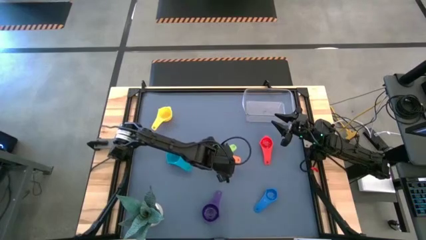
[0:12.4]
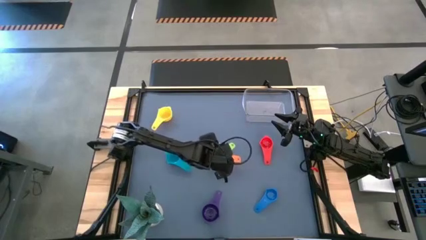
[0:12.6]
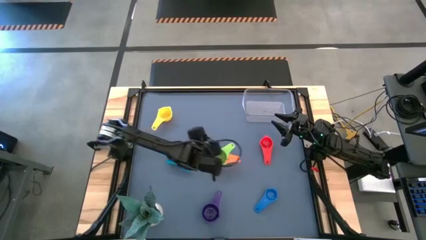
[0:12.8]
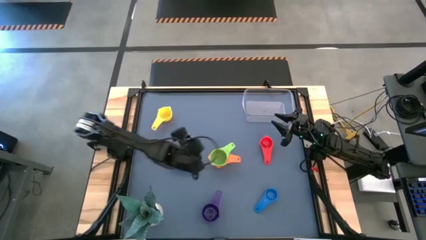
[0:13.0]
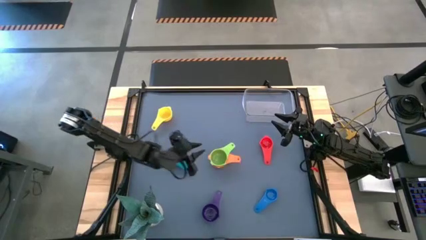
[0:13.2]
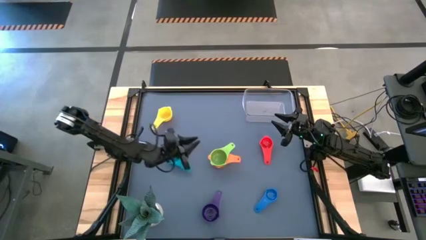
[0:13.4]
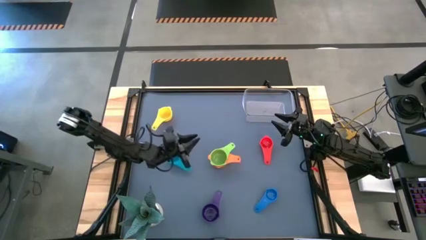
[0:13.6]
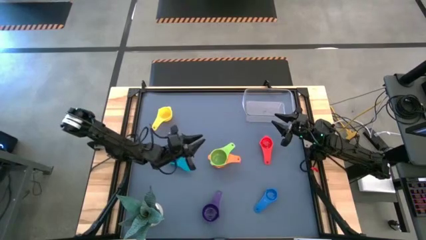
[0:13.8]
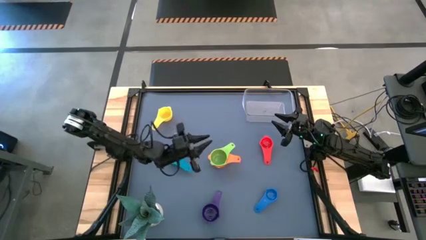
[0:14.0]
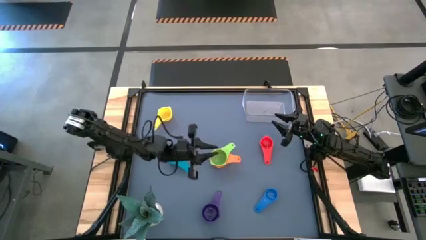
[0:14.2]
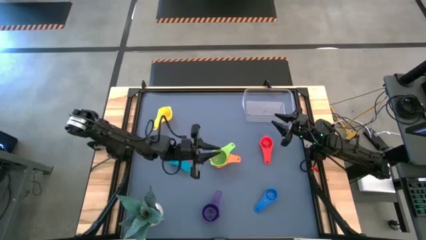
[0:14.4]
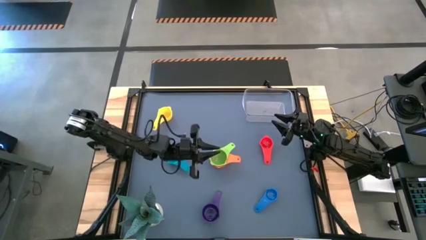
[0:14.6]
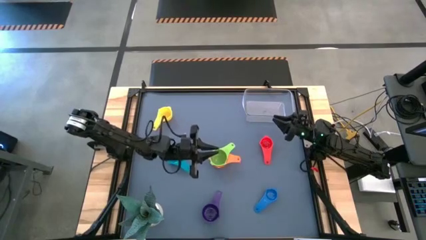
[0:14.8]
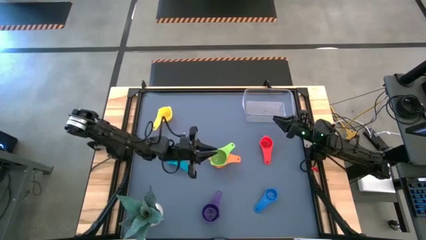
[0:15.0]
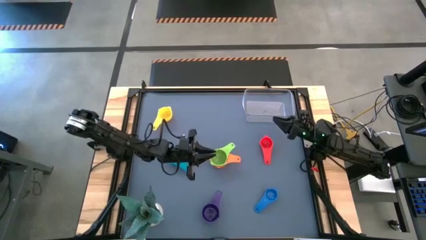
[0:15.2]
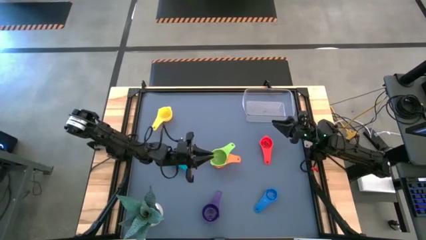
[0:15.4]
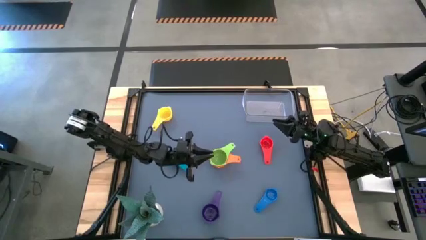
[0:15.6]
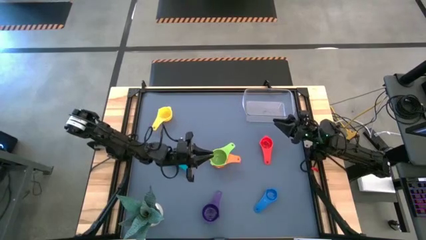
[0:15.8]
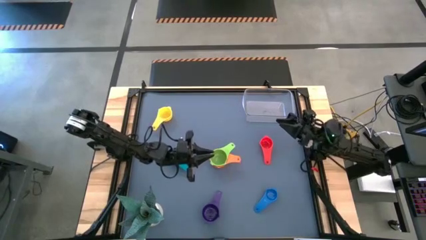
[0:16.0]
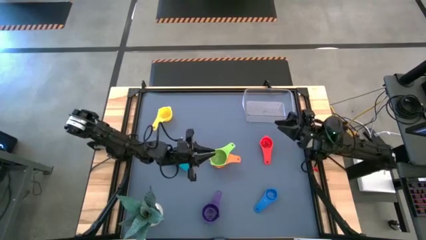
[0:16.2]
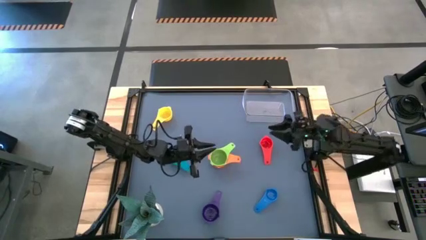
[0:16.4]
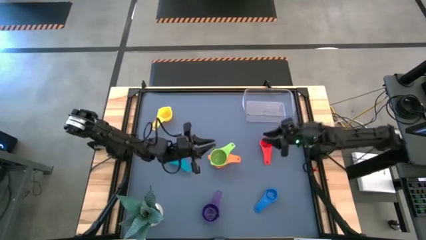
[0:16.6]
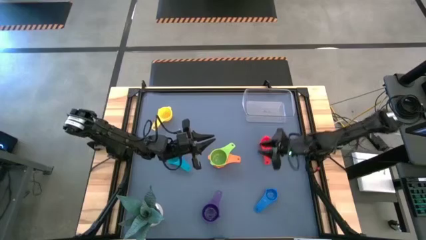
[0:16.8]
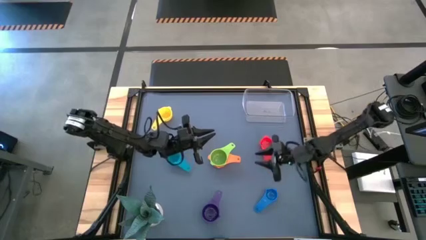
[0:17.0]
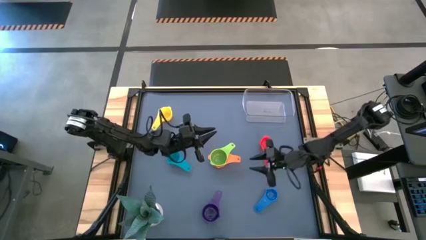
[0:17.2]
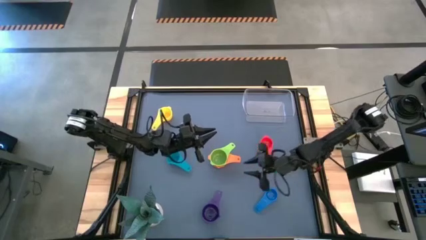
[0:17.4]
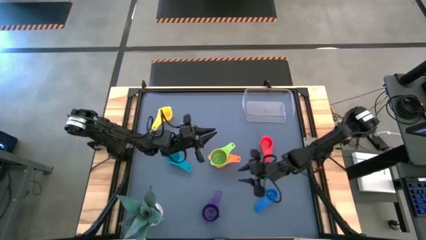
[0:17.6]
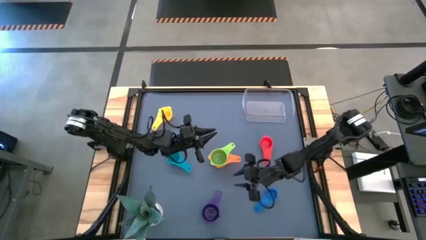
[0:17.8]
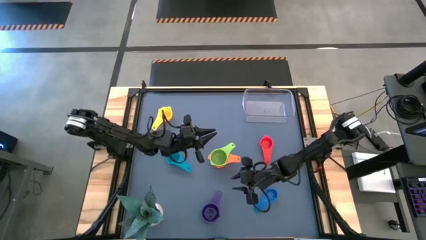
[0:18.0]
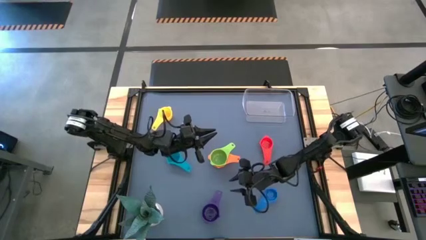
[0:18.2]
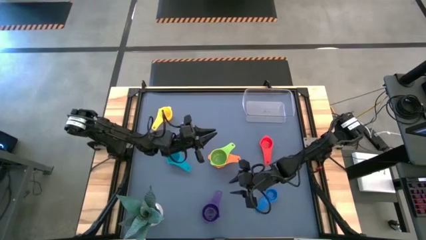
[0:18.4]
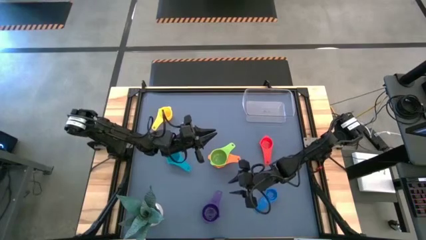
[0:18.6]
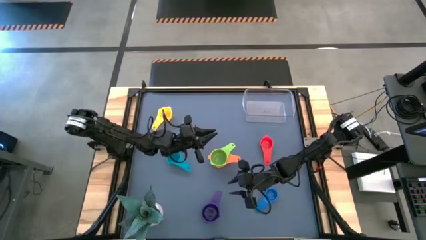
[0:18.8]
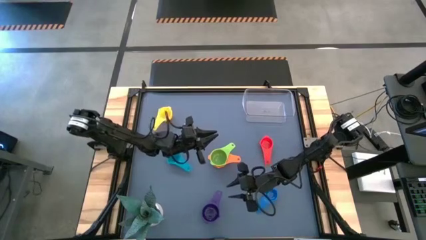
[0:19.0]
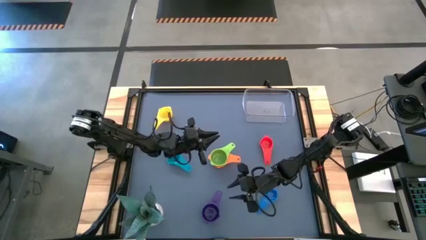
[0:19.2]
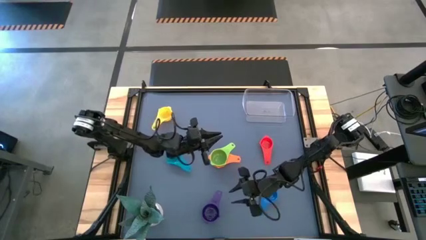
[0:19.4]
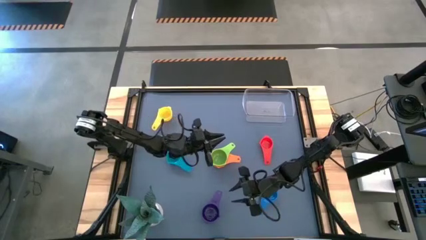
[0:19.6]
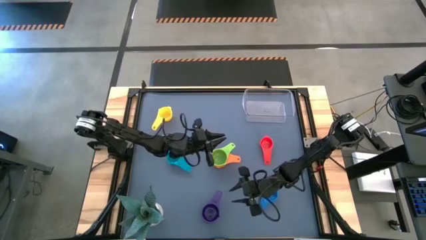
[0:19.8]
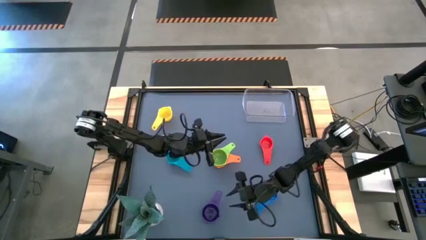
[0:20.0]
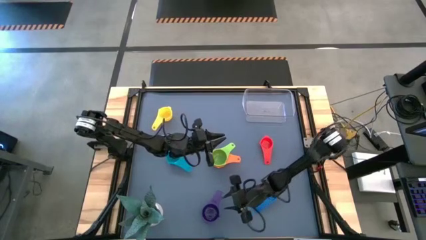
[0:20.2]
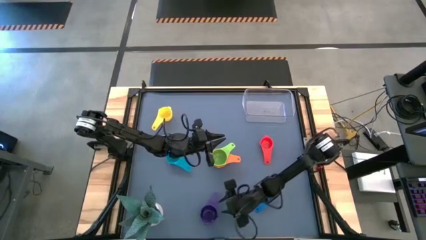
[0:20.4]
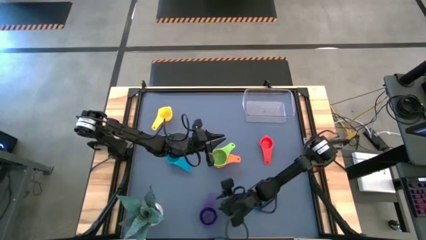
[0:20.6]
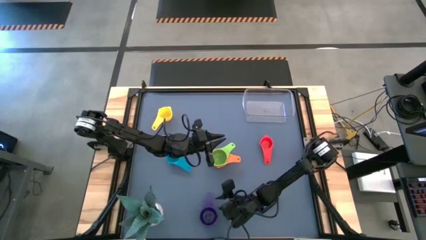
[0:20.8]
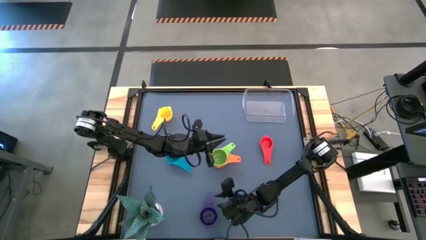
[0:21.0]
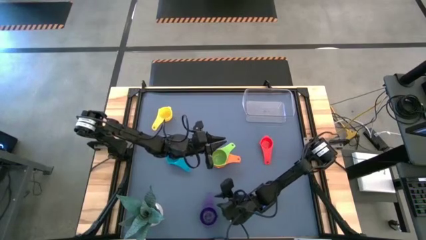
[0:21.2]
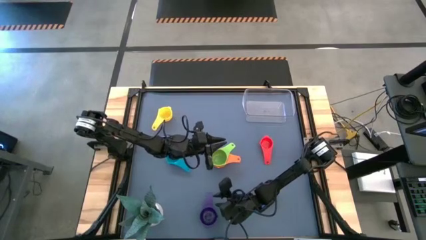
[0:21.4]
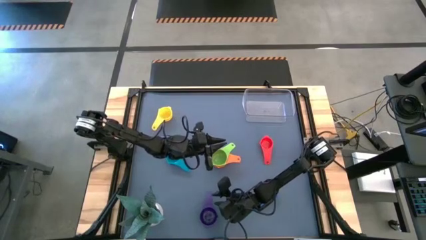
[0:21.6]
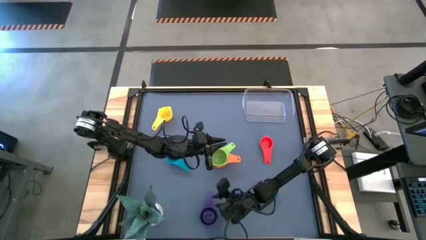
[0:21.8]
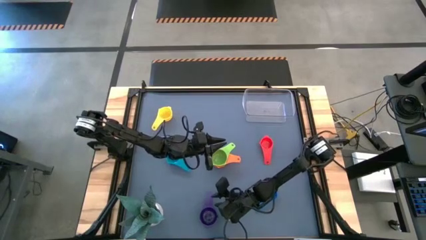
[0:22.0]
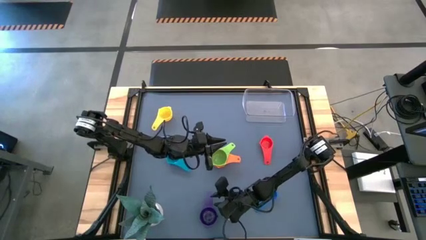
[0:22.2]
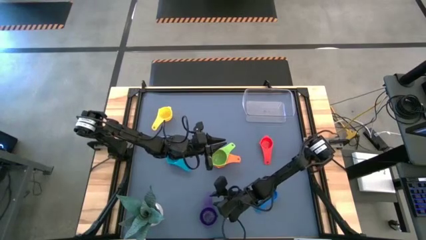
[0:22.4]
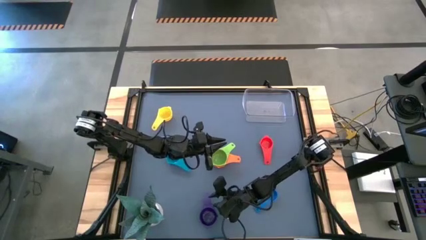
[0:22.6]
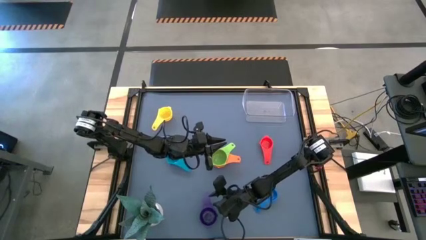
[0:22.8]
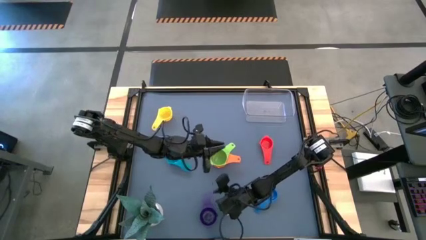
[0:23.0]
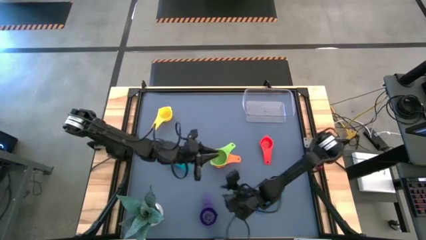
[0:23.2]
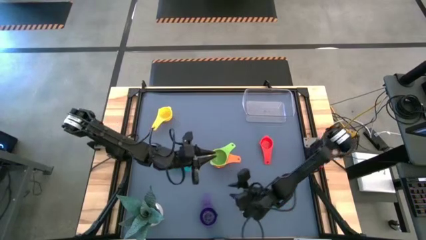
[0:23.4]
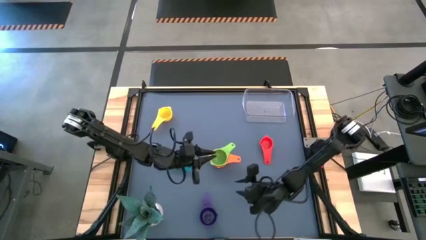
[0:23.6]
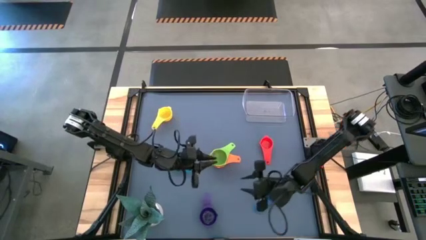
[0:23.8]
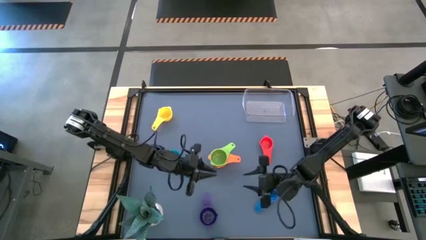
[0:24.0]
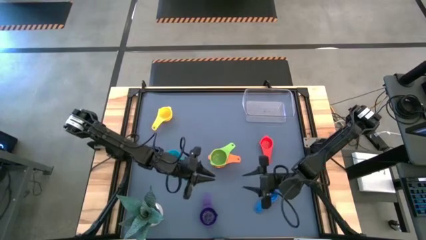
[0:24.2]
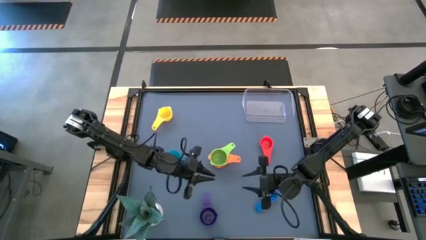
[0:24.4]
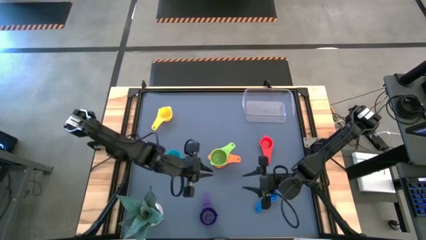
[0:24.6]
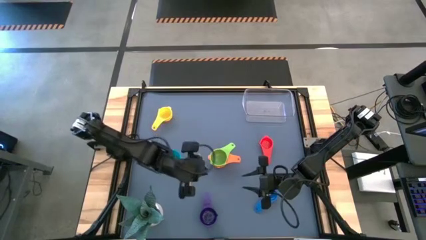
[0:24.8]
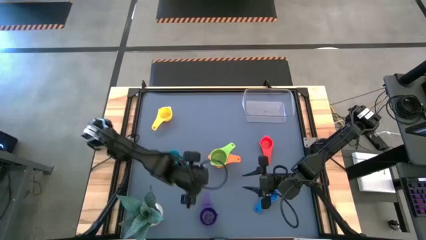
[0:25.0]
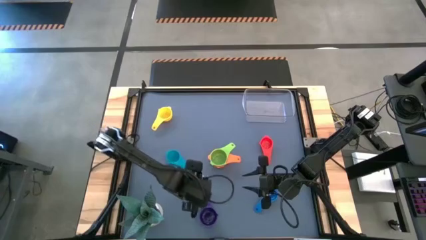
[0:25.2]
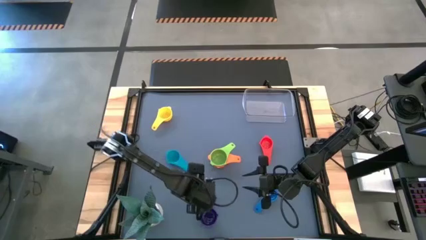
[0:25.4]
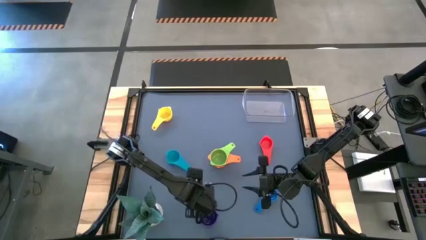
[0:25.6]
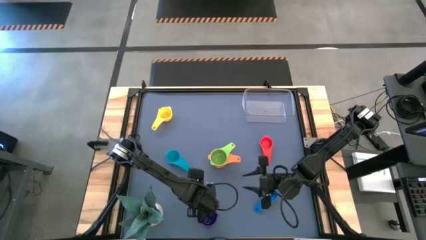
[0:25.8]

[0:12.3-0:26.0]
Task: Nest measuring cups in basket
Stack the violet measuring cup on top of the light green measuring cup

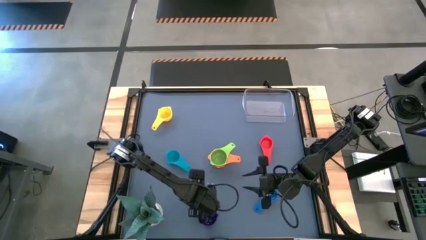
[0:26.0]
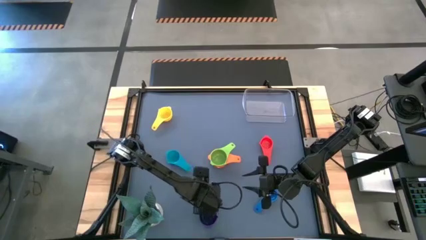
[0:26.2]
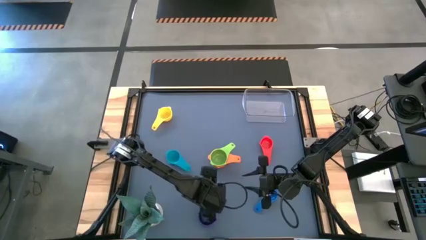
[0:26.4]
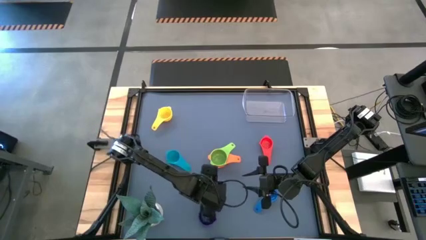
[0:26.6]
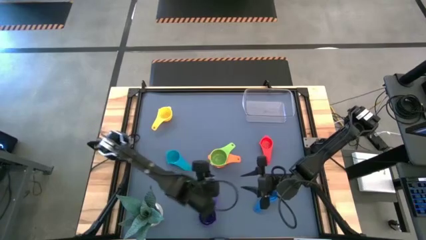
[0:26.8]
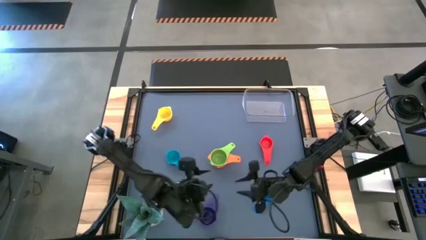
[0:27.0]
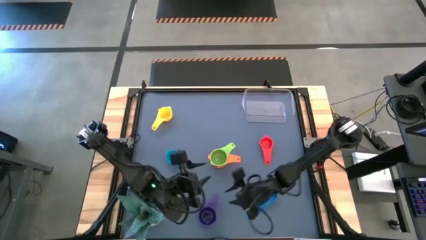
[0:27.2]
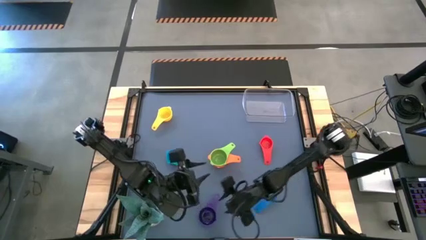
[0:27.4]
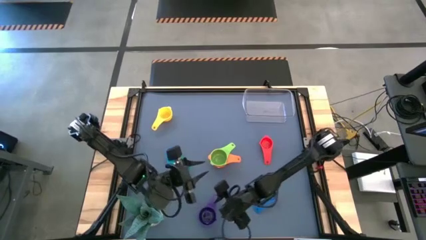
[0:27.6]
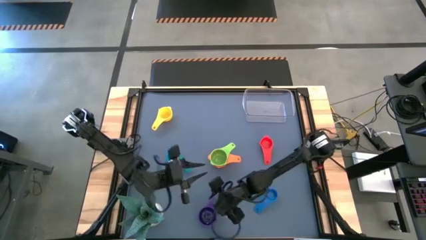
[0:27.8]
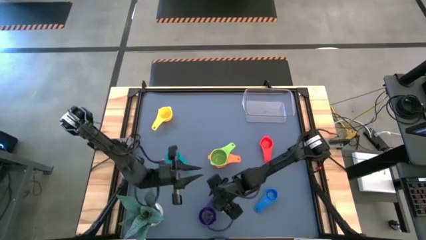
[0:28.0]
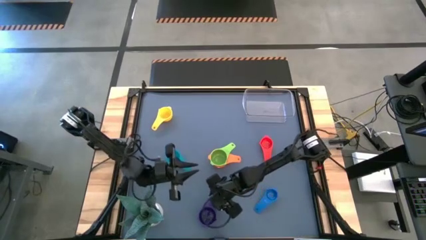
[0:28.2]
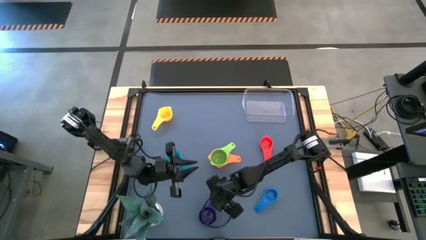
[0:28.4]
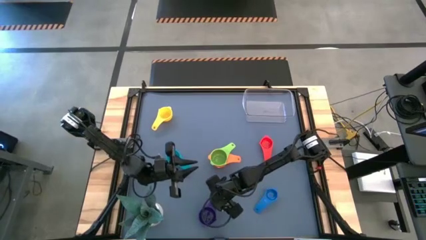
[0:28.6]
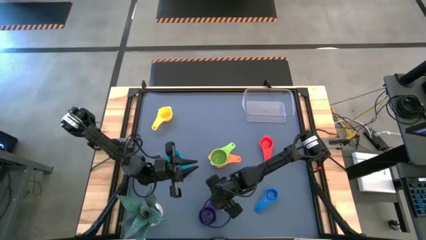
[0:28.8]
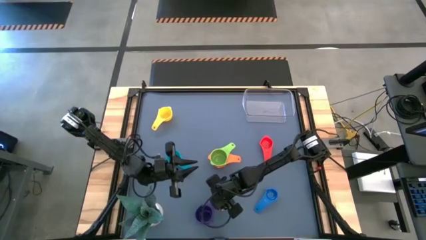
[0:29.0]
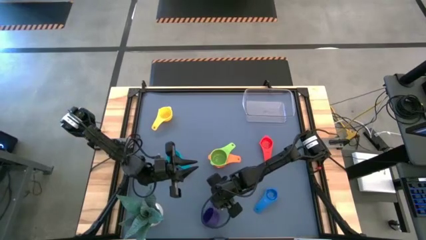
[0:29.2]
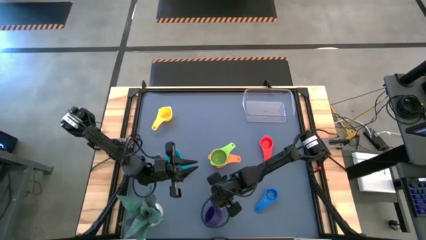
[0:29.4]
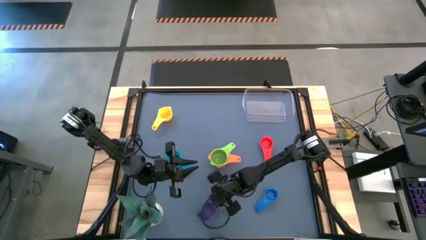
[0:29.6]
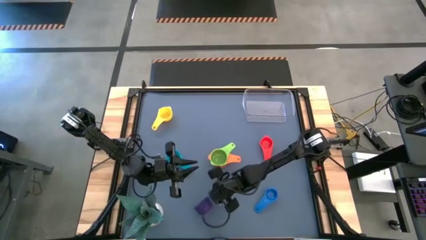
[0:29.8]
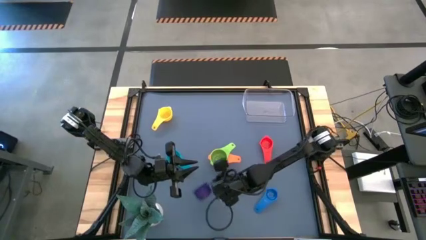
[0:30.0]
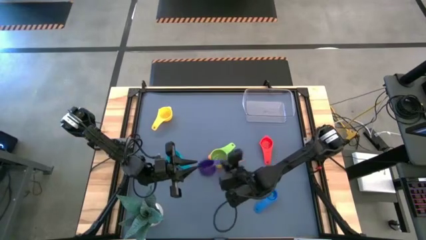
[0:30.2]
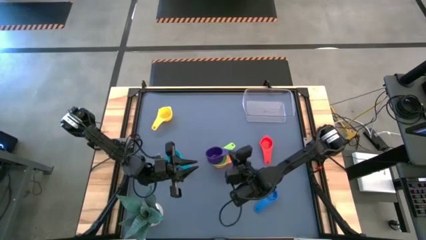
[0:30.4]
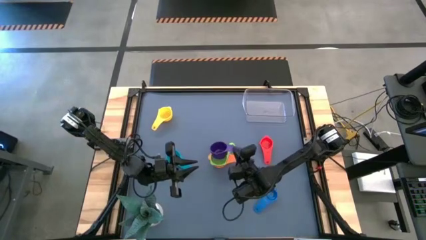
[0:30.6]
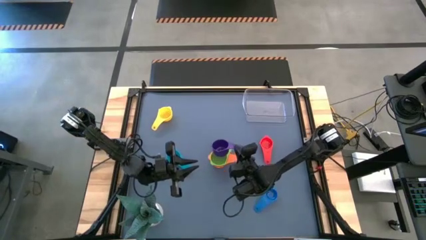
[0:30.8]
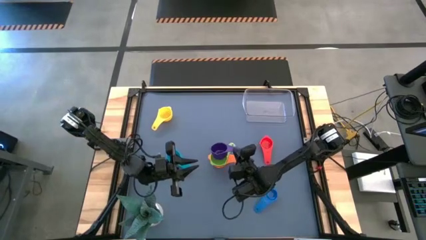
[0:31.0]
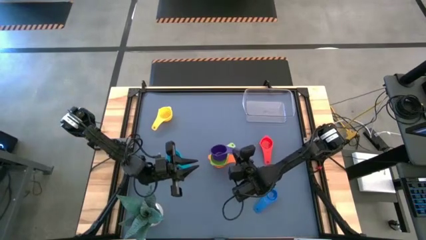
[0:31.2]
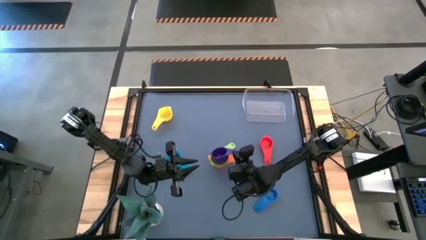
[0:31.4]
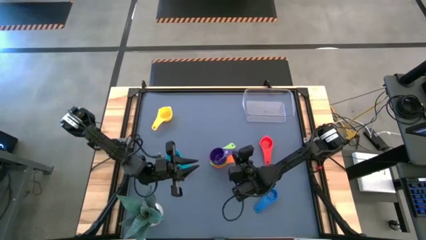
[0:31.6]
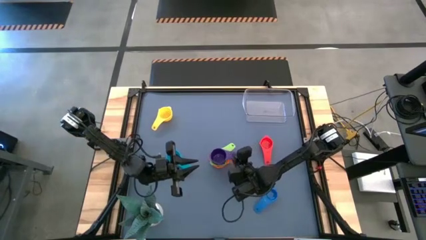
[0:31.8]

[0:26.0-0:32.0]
Stack the violet measuring cup on top of the light green measuring cup
